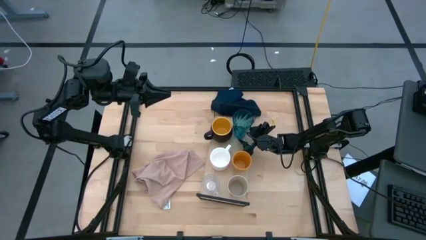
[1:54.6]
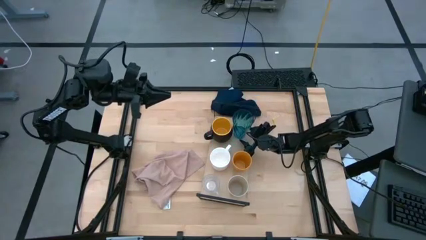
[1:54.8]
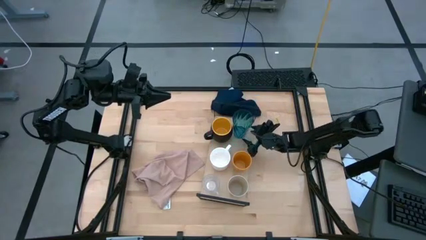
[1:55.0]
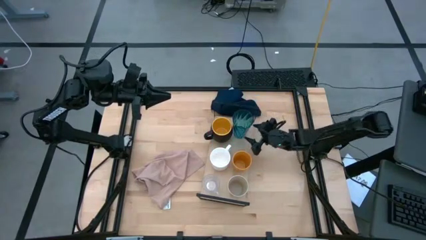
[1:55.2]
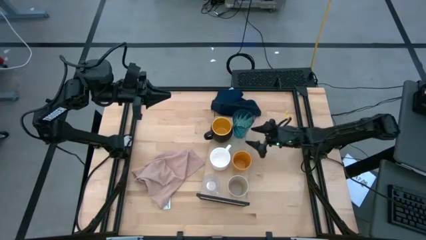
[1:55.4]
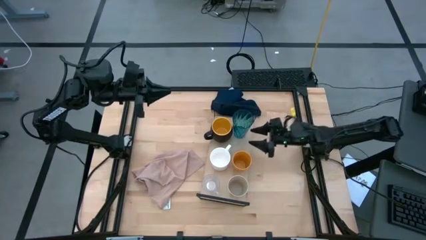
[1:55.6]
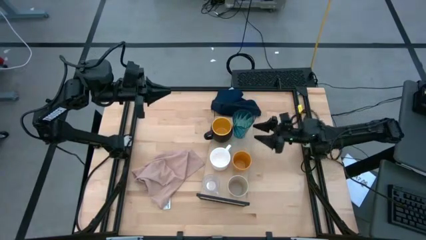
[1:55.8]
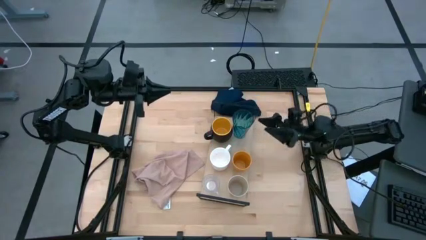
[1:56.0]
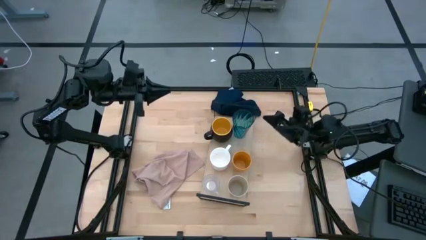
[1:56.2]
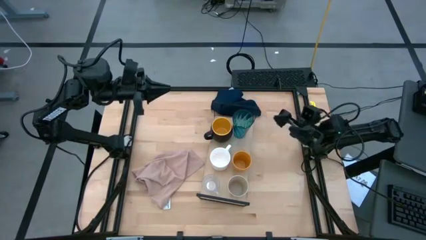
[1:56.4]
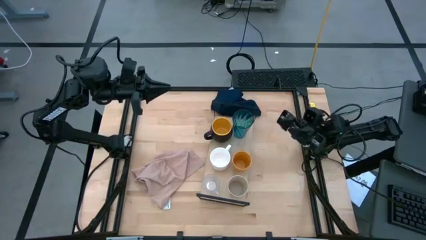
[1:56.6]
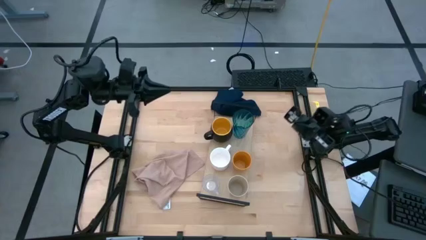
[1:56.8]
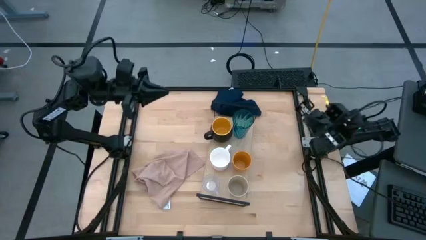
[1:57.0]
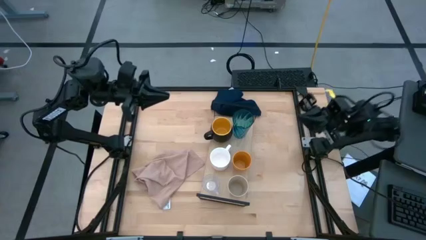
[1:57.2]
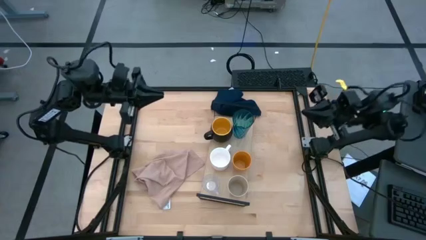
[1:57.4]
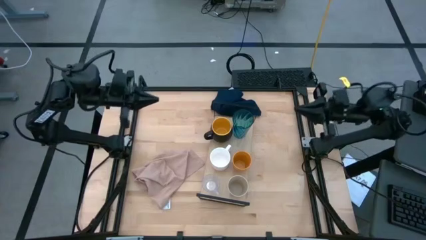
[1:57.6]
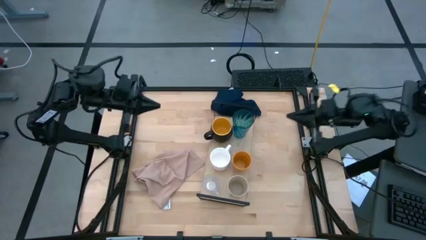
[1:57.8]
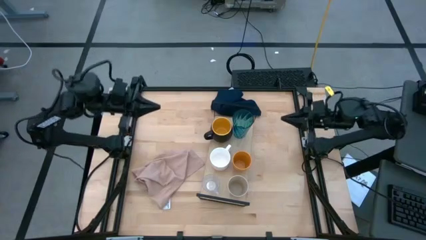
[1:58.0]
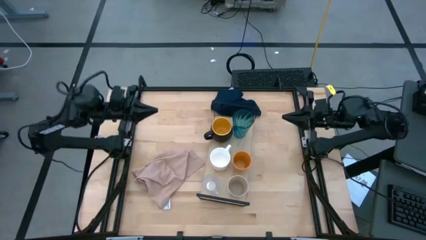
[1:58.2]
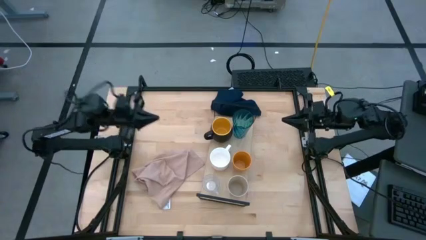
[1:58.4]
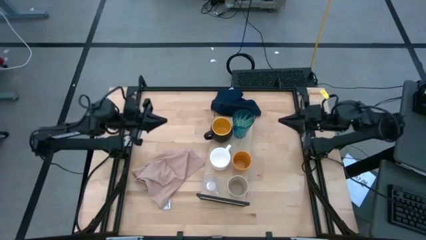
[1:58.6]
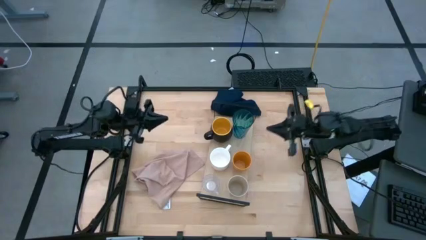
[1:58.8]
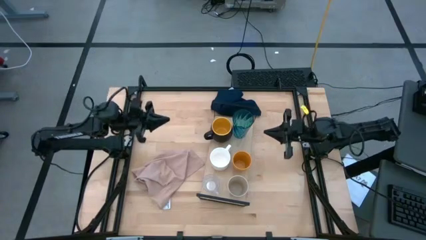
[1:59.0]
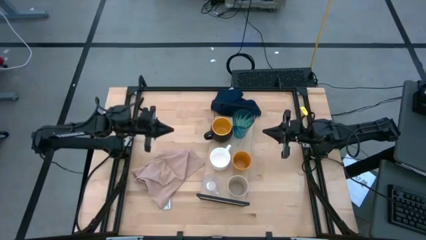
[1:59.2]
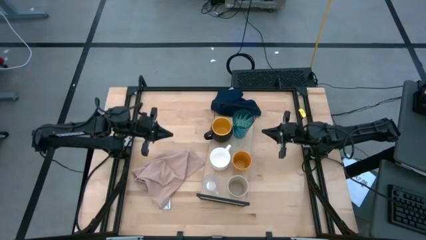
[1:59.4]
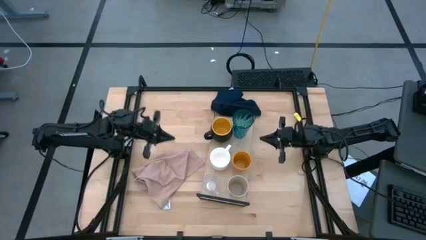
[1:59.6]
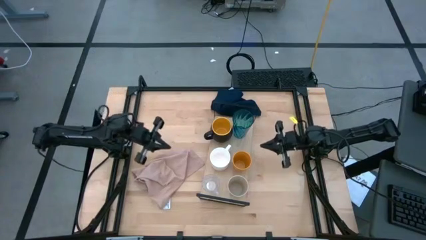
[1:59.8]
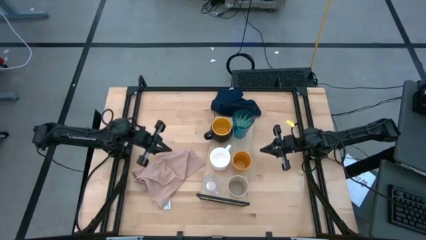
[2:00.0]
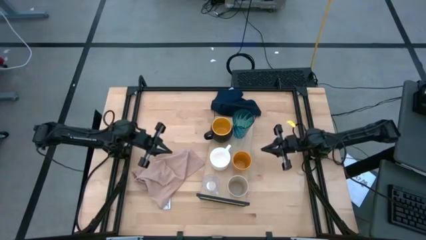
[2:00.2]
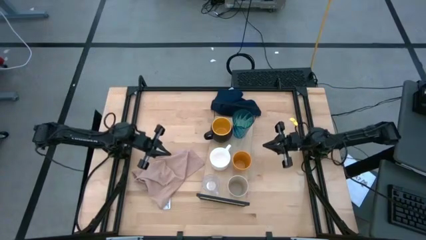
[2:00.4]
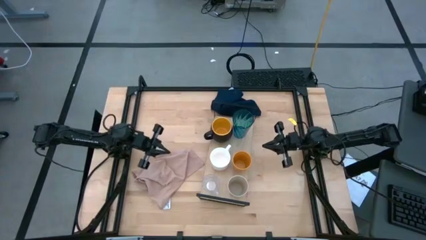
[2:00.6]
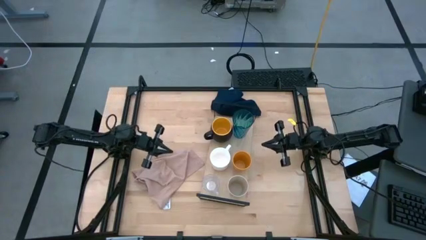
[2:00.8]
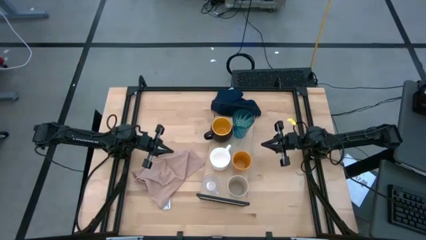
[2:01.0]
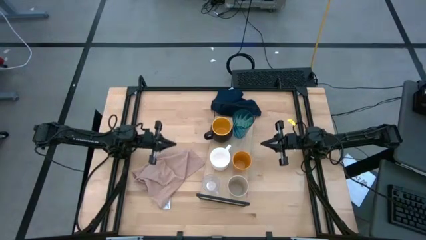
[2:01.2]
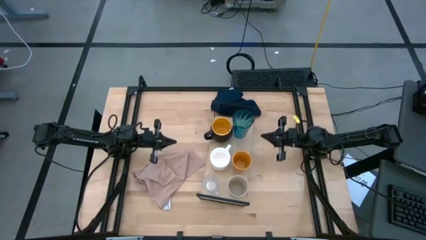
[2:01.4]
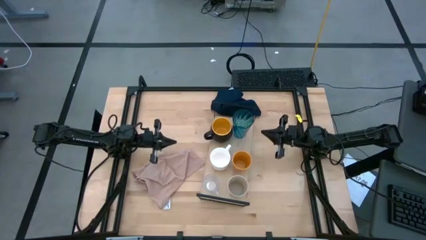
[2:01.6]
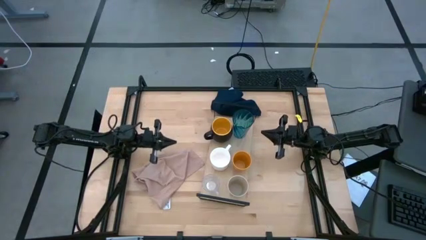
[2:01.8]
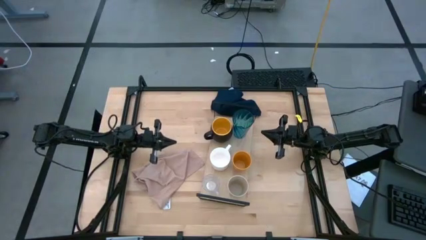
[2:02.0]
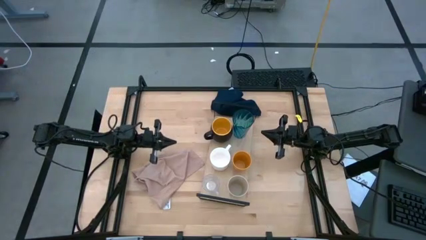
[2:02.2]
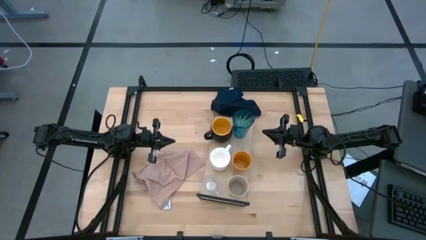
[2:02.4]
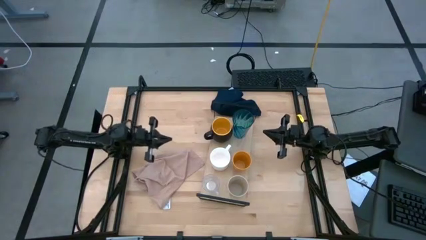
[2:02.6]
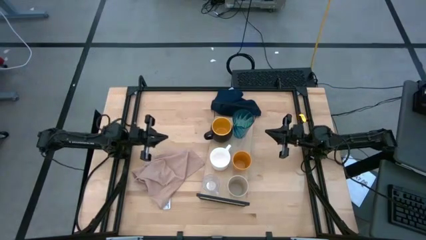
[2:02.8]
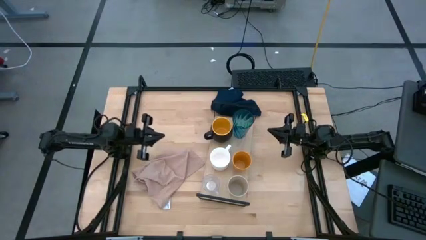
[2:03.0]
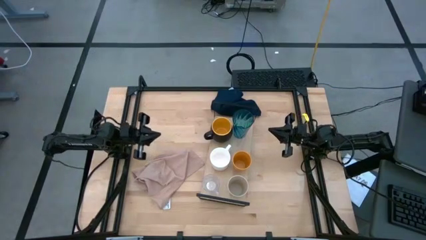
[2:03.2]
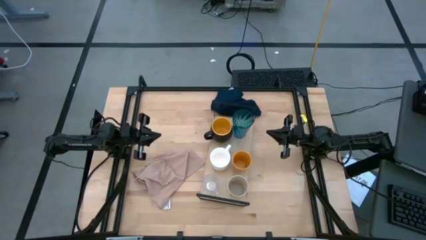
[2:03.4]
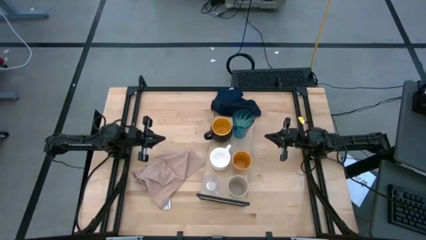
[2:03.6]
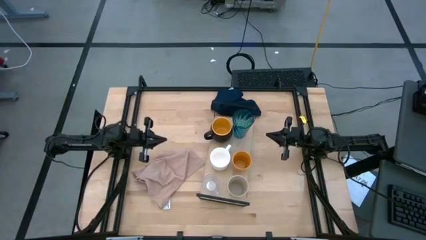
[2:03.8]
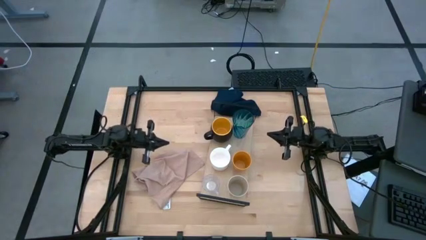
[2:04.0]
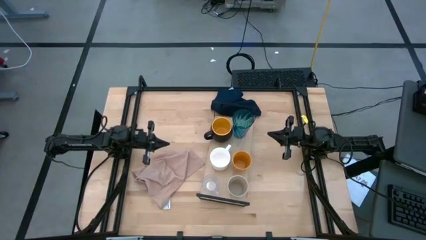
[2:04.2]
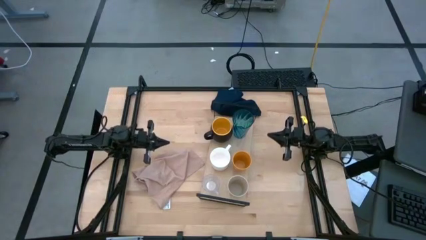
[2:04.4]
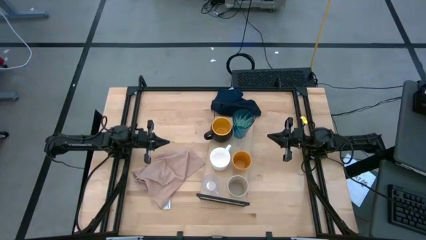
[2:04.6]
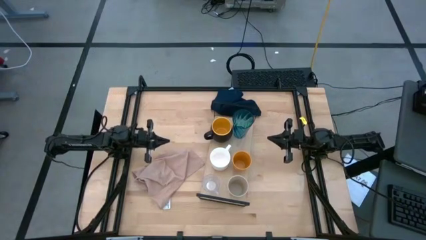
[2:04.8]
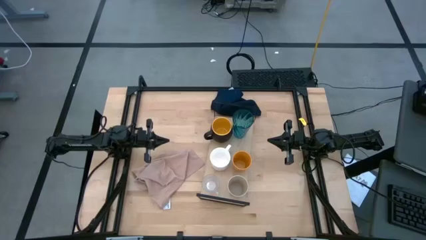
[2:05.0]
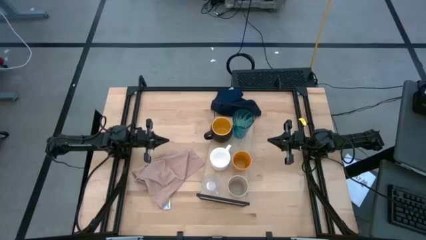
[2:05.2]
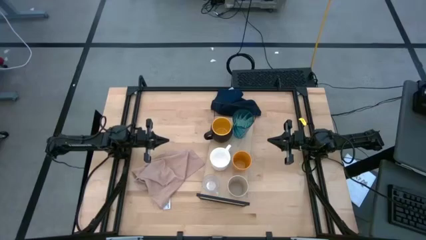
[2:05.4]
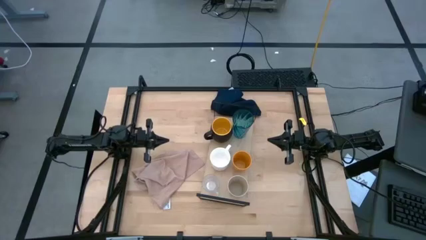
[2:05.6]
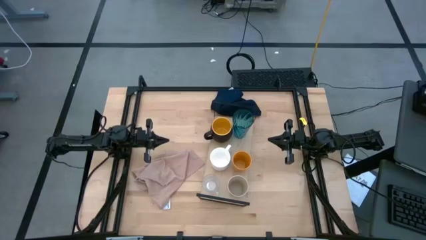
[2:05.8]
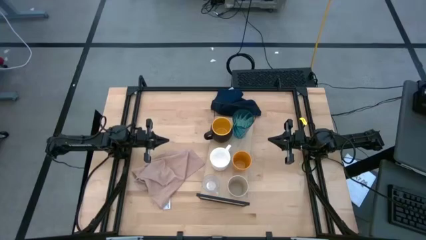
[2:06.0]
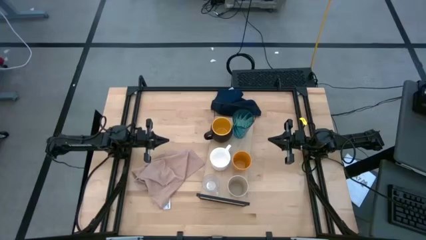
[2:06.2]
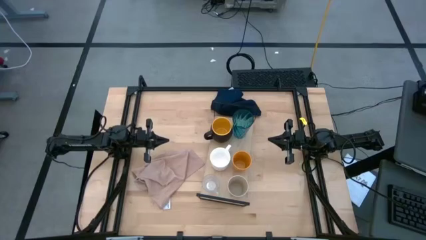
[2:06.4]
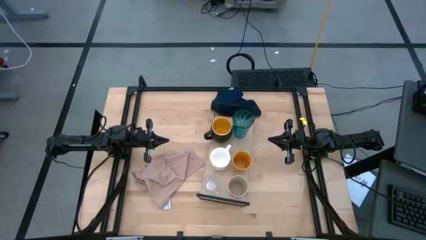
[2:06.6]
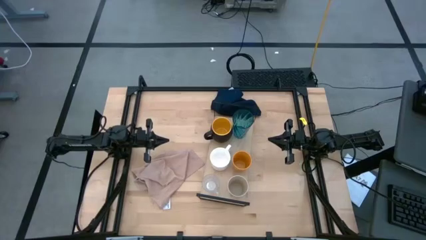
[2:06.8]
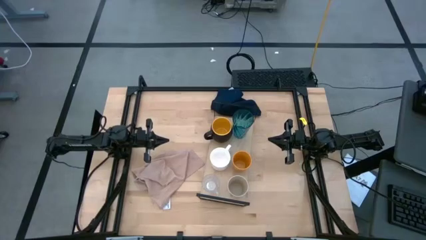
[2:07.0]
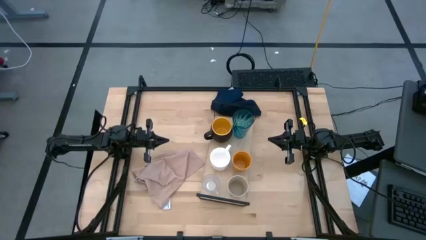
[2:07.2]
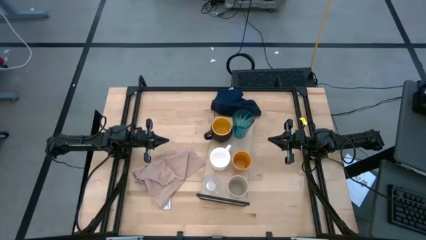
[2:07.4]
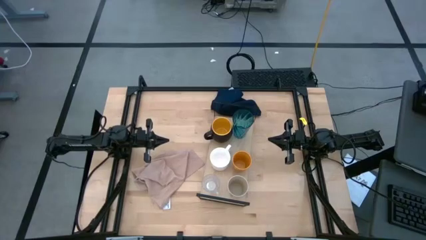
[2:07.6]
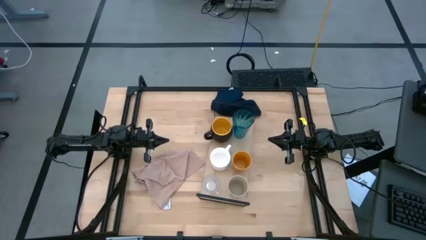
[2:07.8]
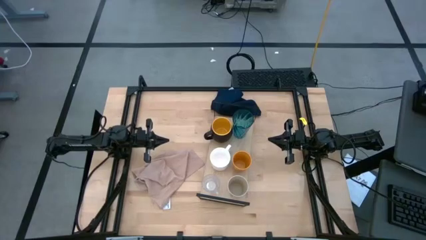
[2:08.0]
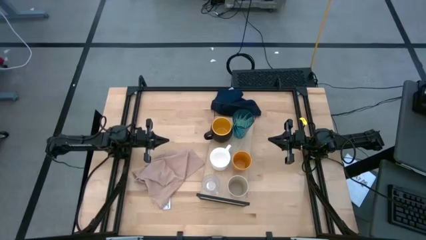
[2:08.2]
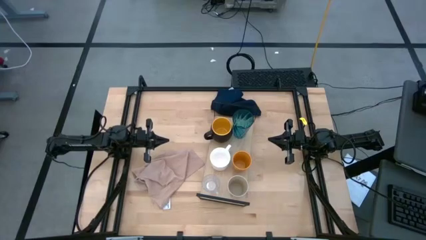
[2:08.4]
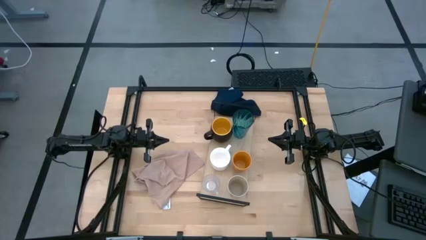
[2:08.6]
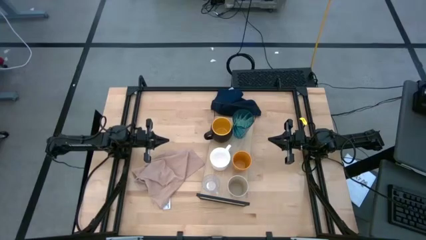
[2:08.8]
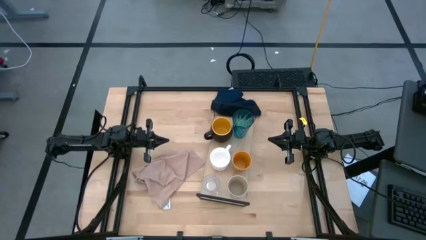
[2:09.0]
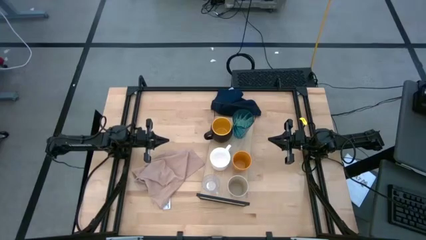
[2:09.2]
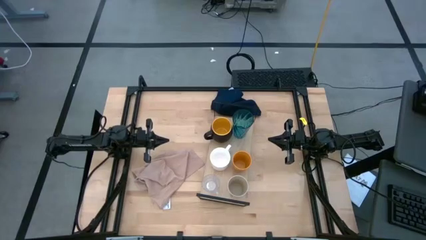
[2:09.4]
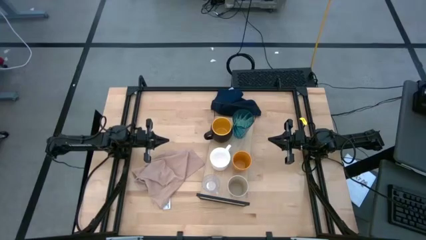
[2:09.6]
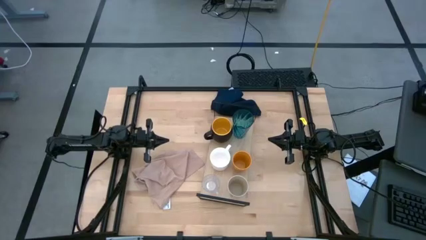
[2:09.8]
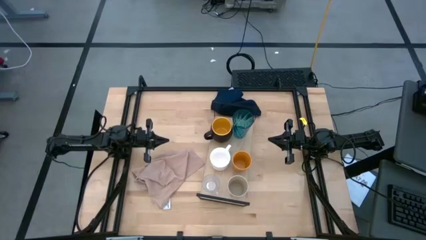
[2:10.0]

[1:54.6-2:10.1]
Task: Stack small to large cups/mugs on shelf
Return to Home Position

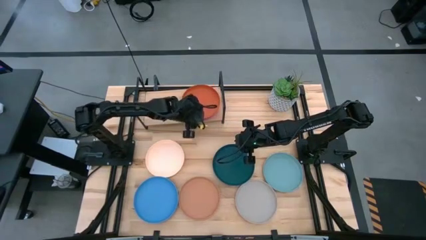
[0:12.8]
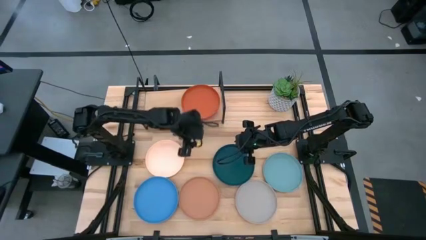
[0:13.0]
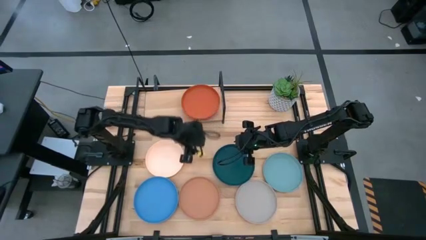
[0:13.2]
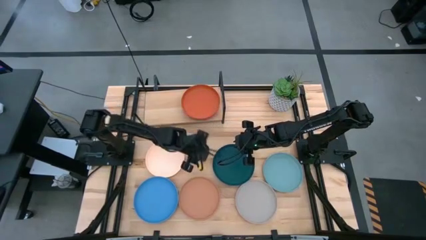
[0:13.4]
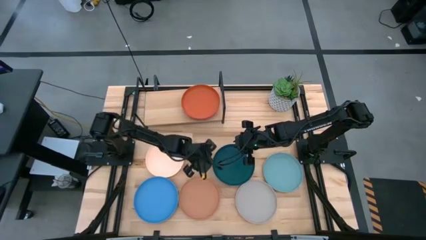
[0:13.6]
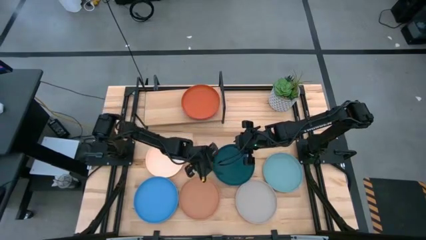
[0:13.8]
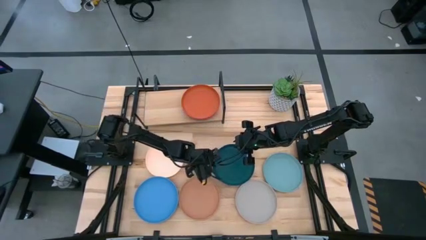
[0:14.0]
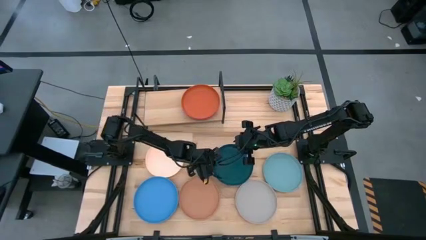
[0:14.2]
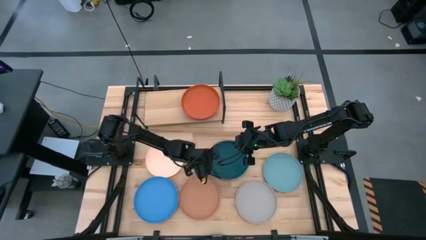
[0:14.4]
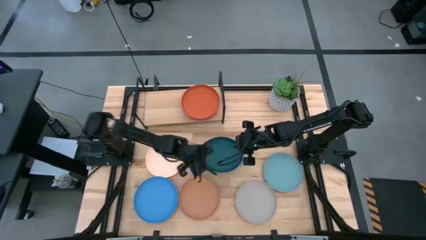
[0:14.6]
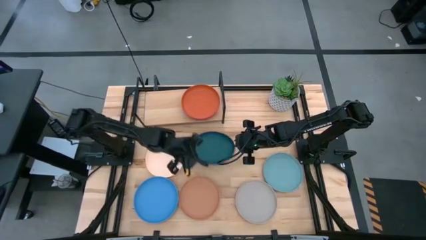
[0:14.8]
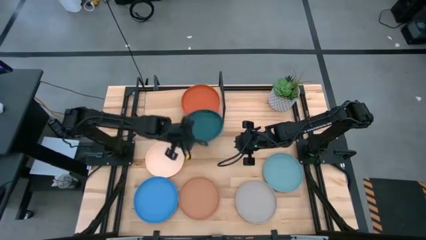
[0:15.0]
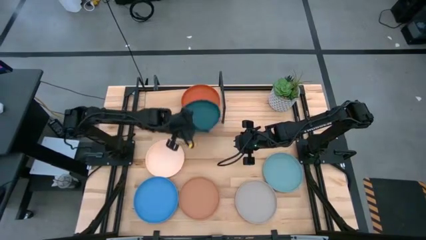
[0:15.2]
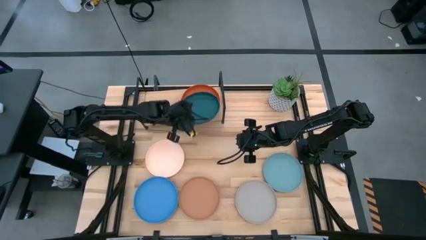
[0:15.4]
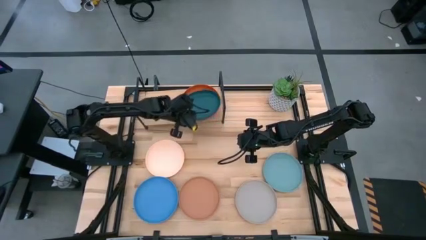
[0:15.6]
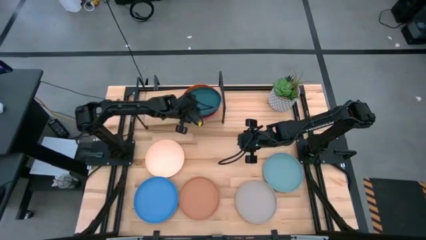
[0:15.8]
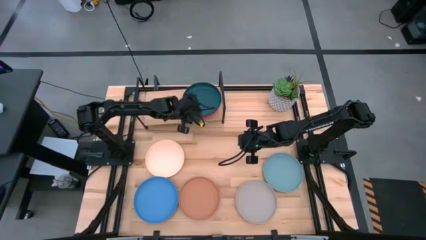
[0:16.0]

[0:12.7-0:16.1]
Task: Place and stack plates onto a shelf
Stack the dark green plate on top of the orange plate on the shelf
